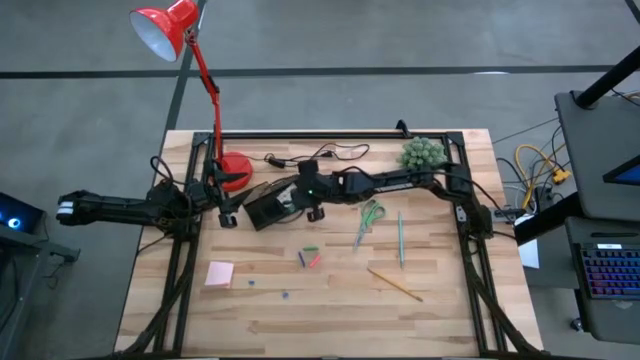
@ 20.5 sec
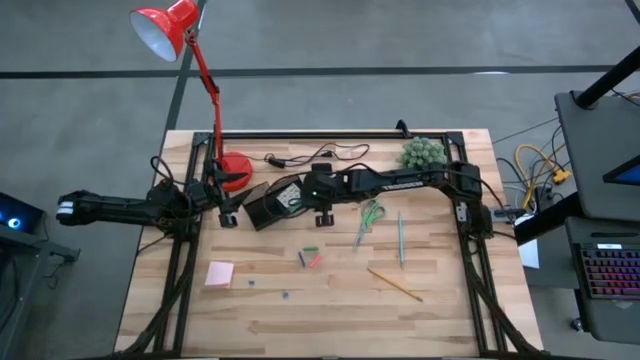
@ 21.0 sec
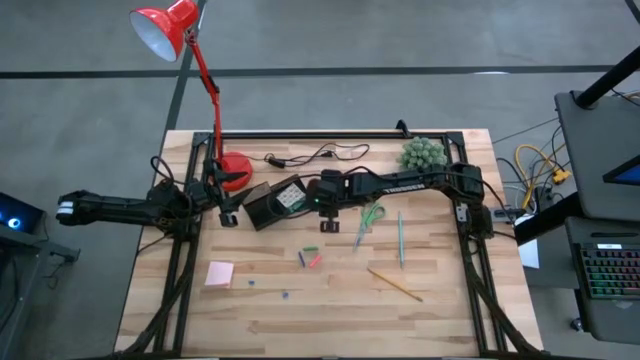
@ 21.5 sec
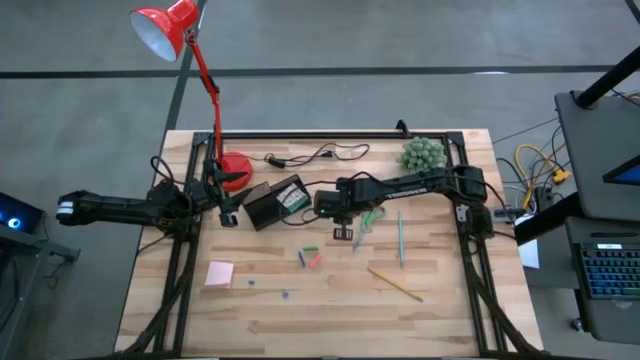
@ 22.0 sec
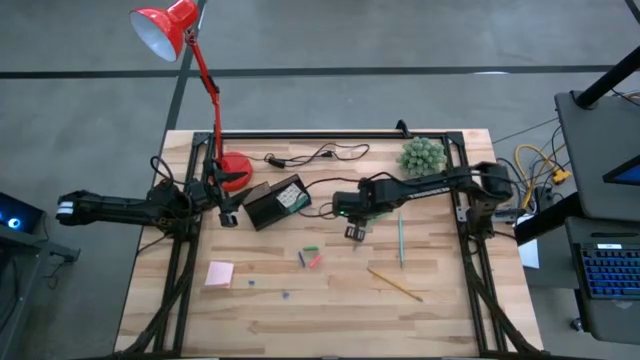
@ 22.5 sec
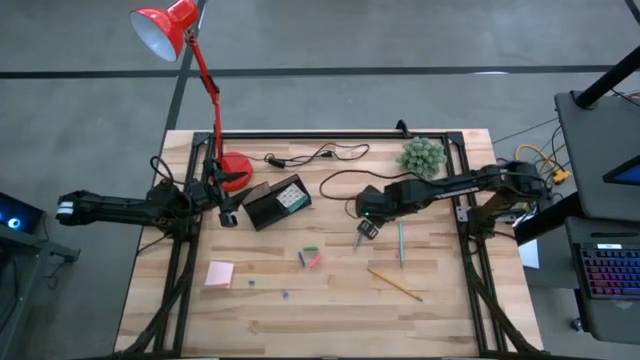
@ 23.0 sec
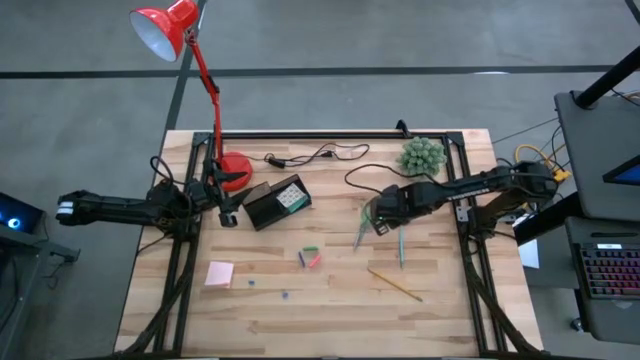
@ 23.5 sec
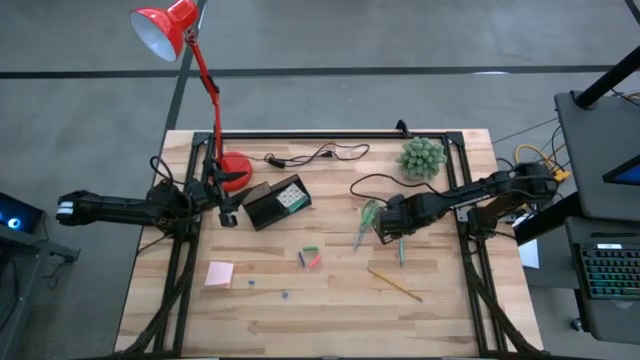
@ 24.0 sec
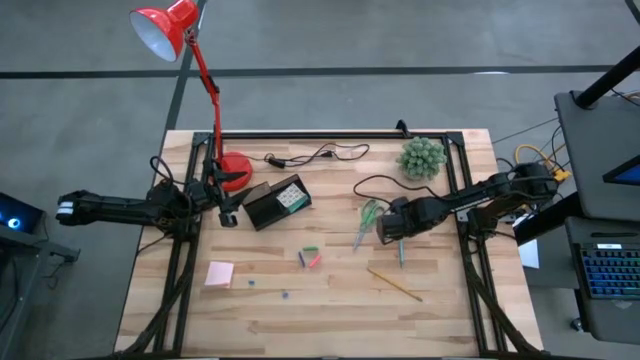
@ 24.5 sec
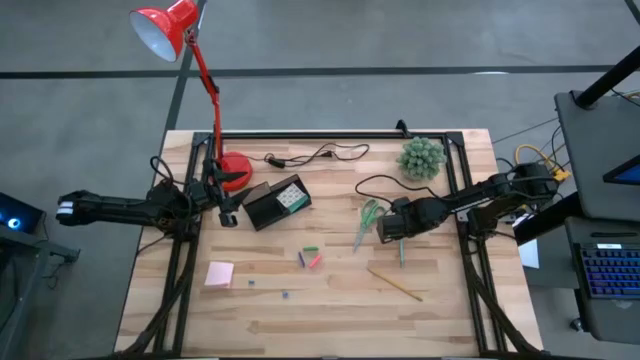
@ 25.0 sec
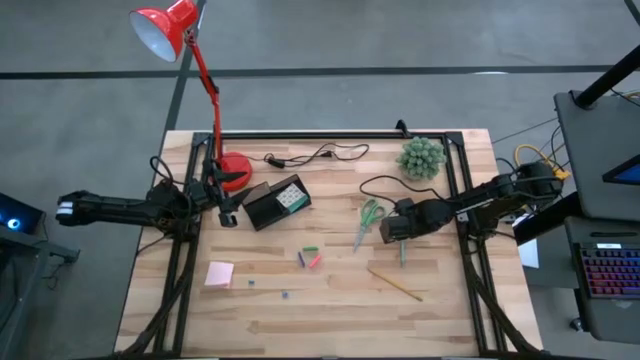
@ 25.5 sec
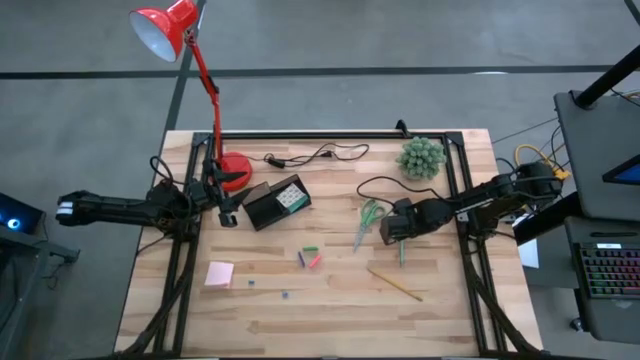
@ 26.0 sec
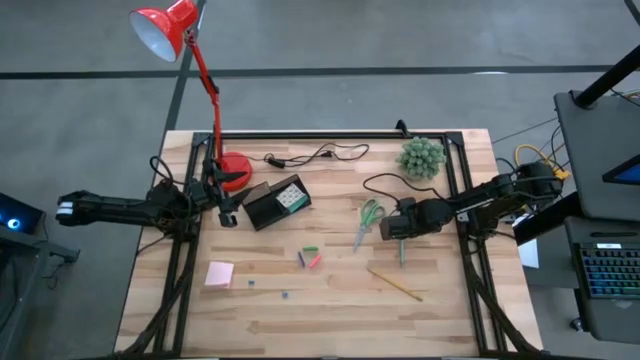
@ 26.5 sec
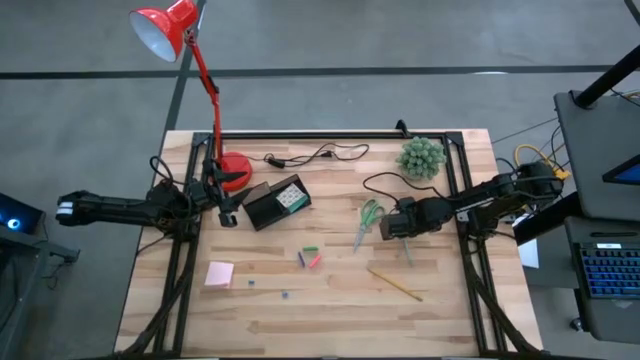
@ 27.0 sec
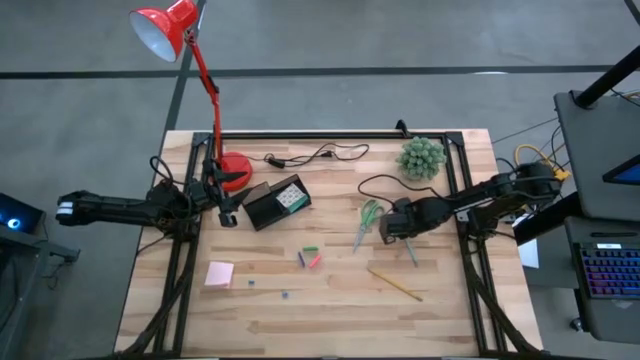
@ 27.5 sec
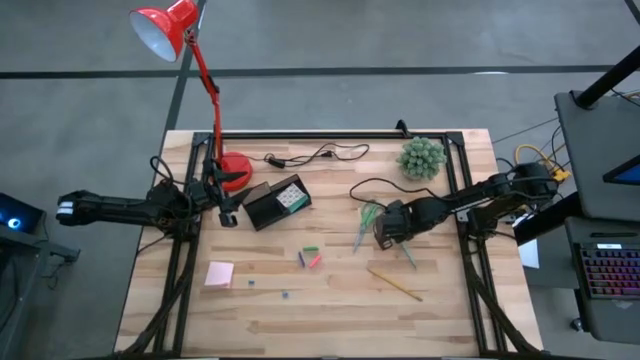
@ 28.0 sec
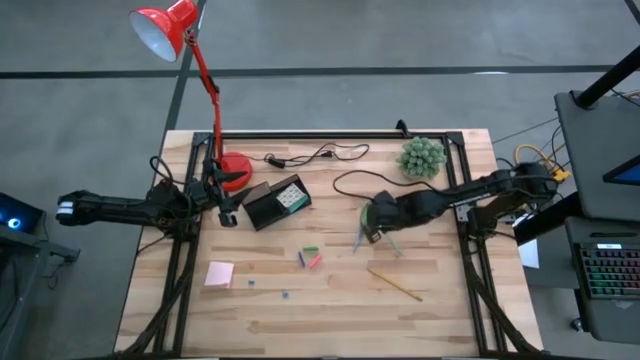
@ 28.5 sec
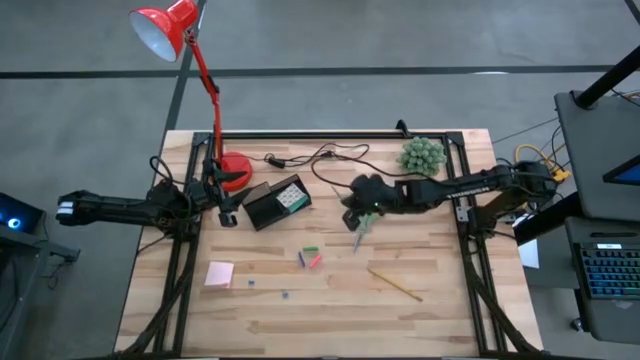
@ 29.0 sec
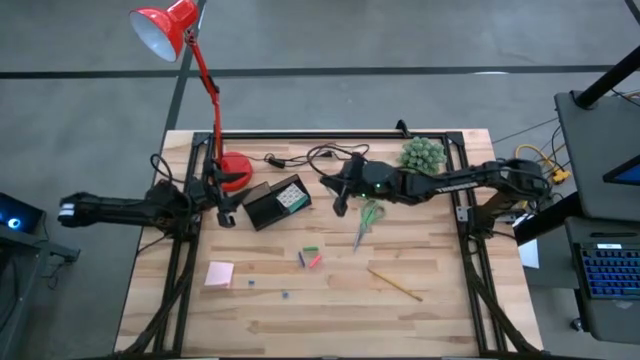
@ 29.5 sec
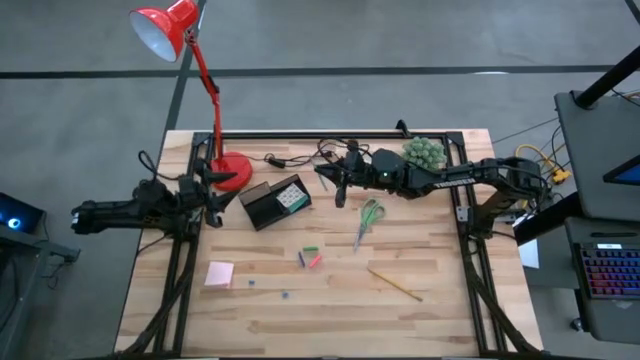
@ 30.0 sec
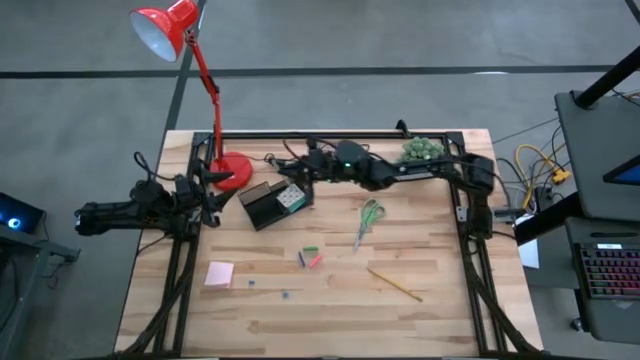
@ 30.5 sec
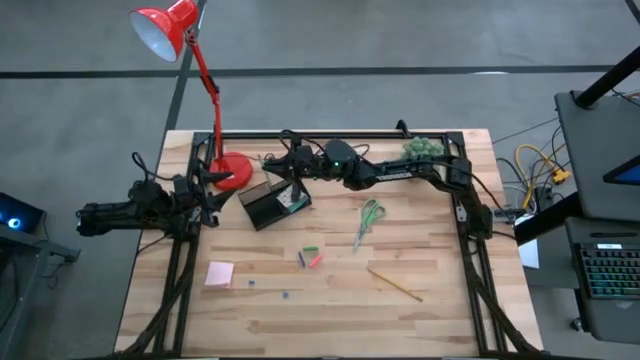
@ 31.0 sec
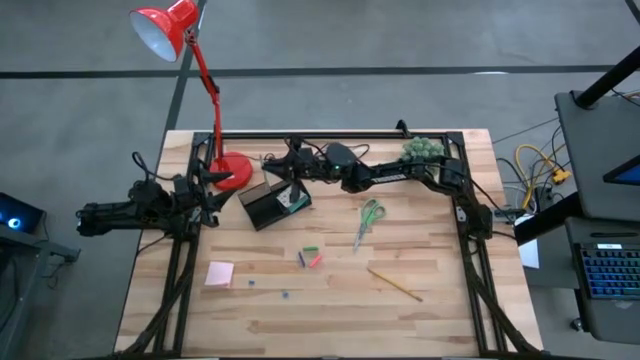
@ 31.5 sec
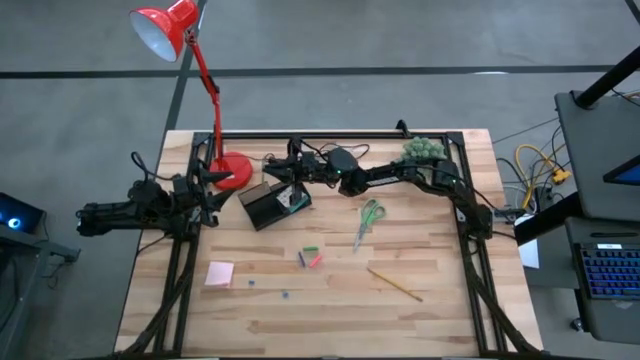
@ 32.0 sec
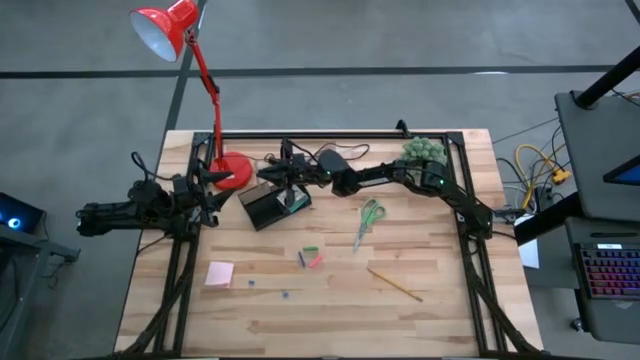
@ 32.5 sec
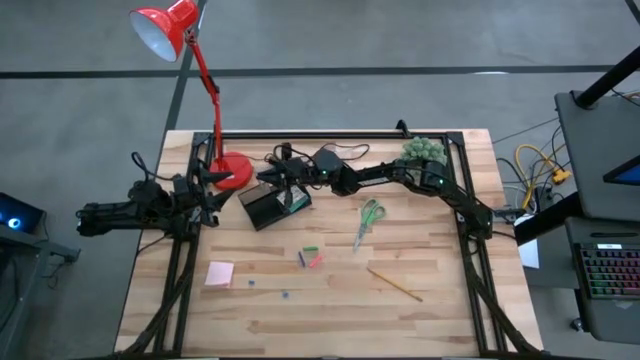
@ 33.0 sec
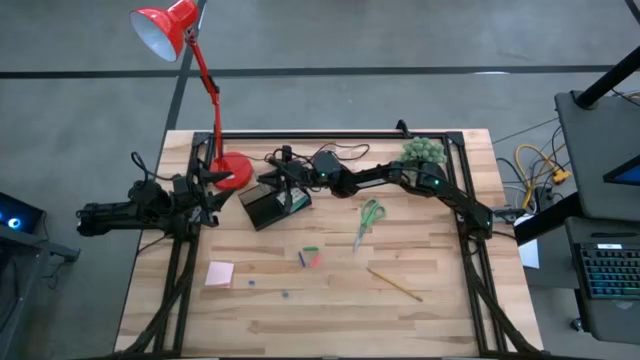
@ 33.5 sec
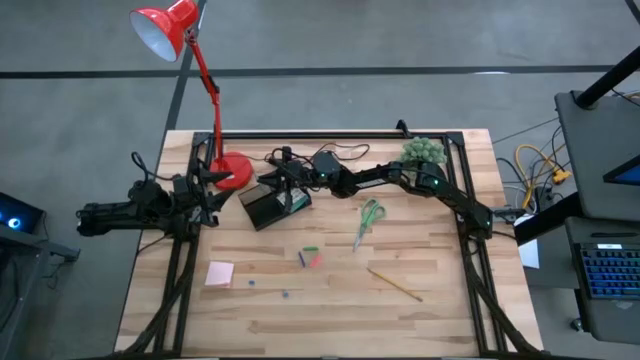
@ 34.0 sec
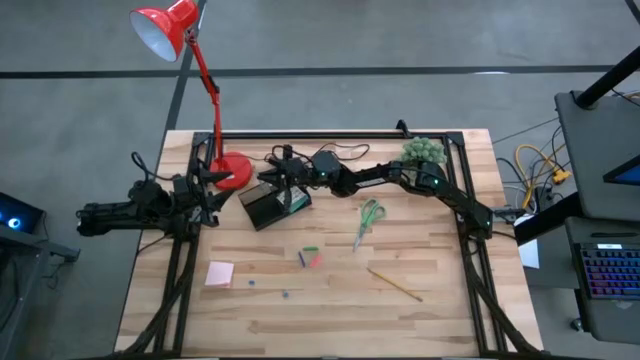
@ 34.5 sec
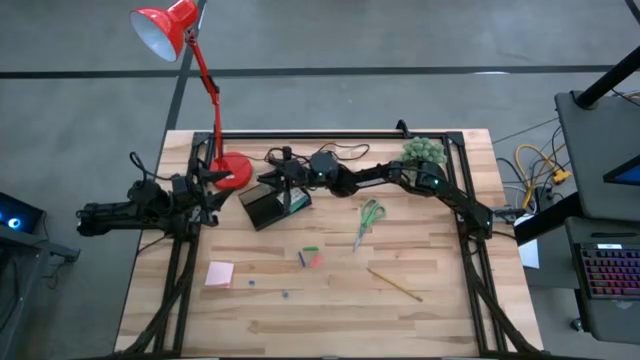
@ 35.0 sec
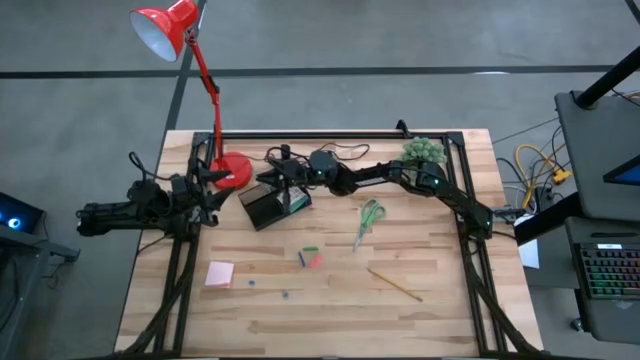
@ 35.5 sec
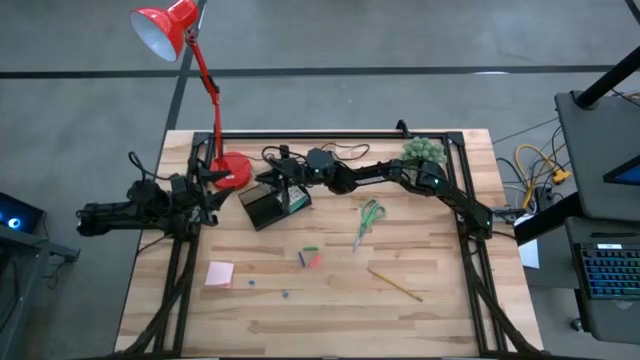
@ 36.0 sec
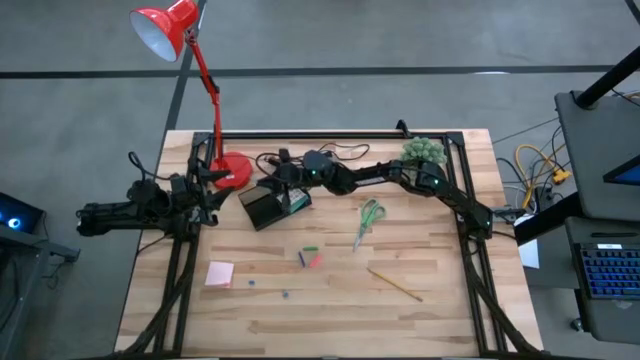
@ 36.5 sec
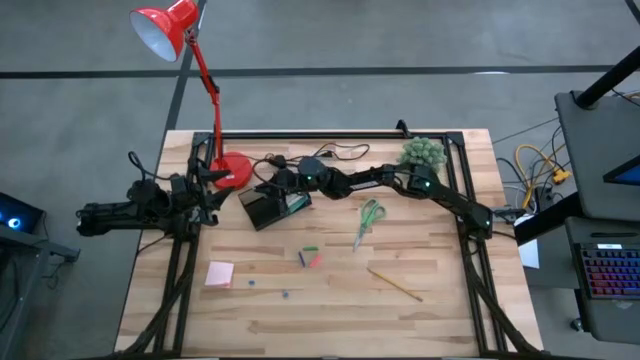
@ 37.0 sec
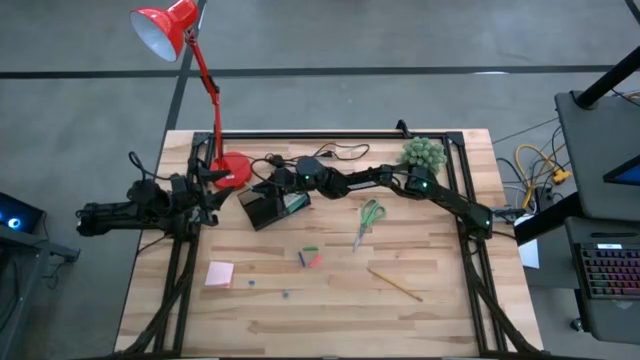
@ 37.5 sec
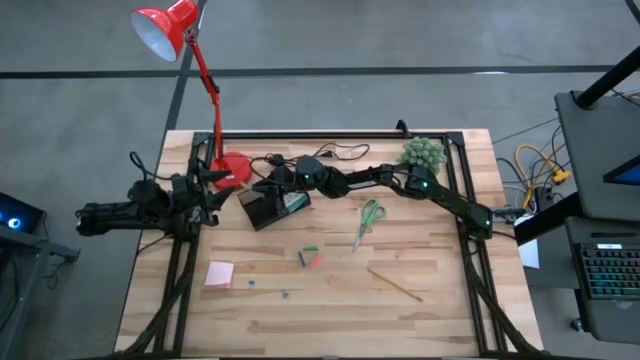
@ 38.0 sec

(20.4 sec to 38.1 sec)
Task: Pick and place office supplies into organizer
Put the blue pencil into the desk organizer

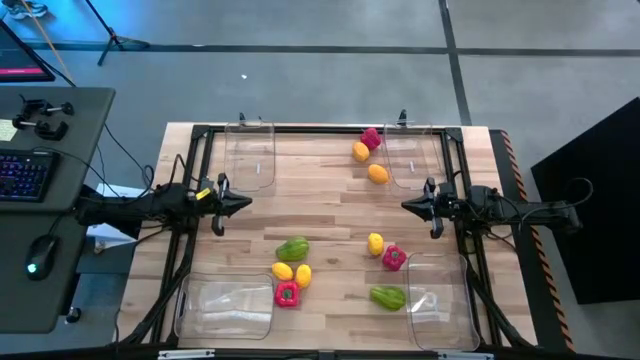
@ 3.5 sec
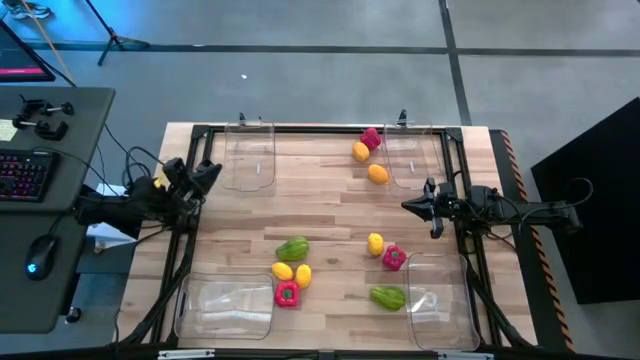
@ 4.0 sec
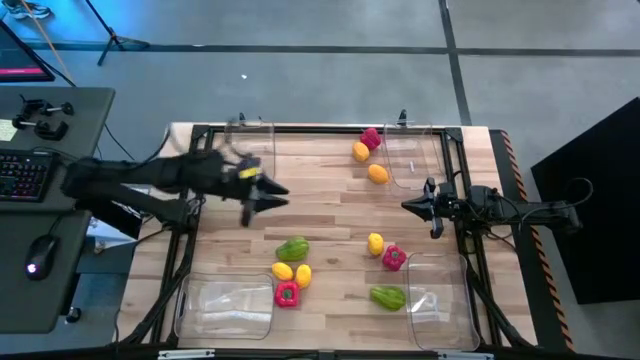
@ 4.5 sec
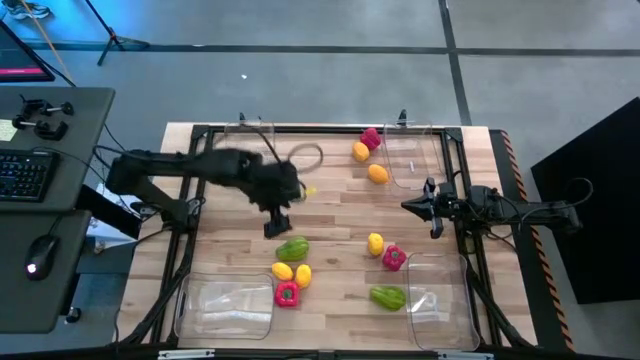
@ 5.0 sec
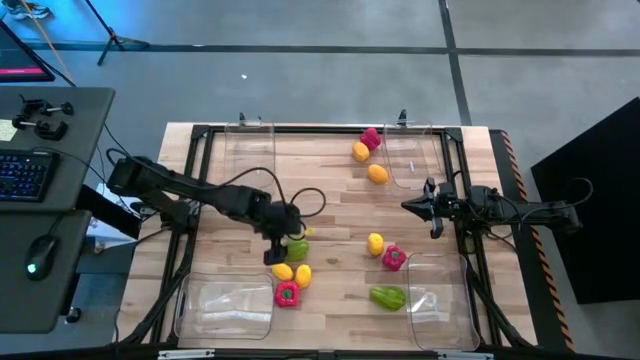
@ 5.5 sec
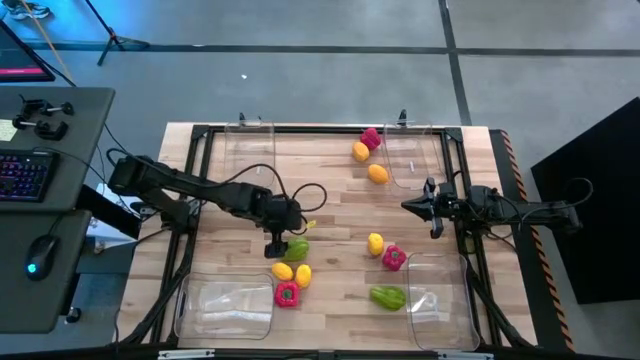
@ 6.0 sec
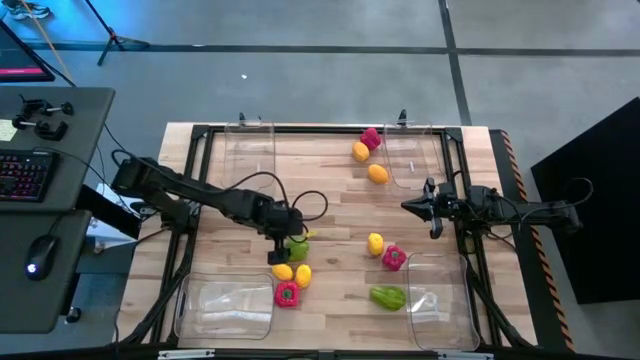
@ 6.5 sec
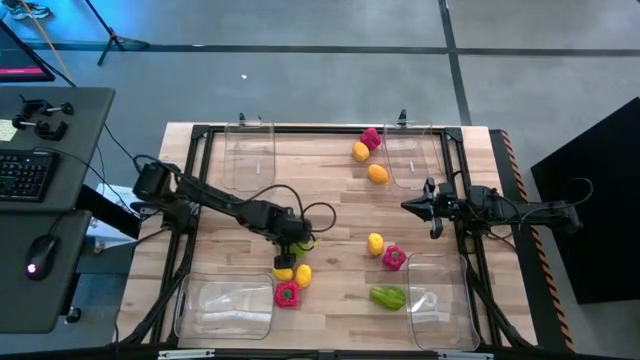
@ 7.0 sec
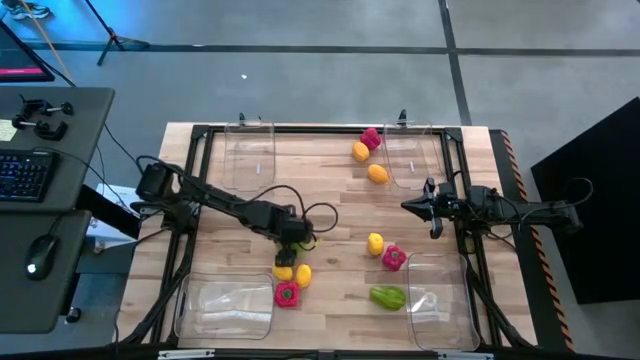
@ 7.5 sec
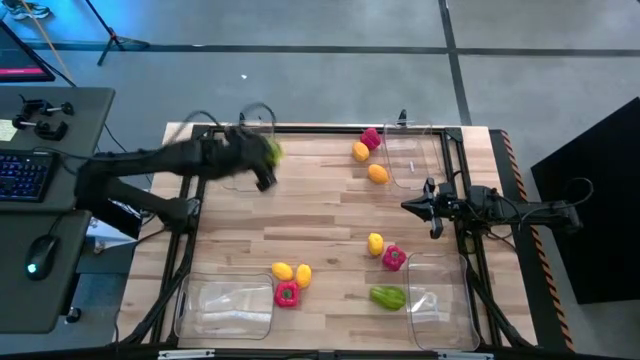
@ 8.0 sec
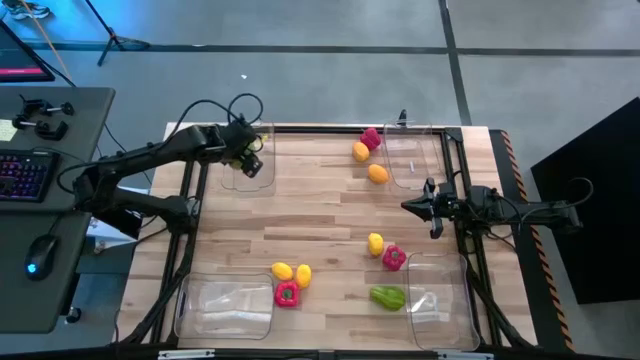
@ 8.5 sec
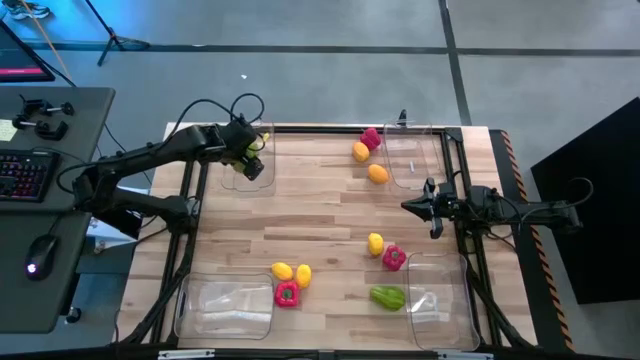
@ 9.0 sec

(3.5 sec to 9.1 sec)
Task: Sort produce into baskets
Put the chayote into the top left transparent bin
